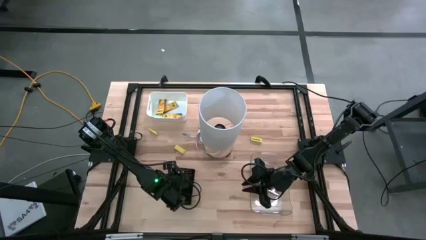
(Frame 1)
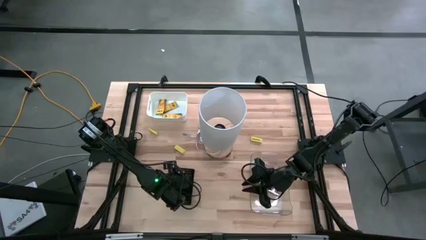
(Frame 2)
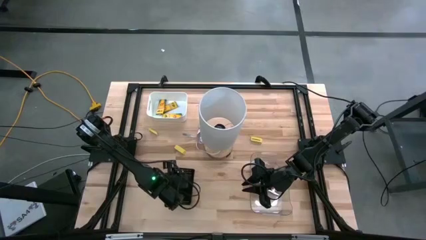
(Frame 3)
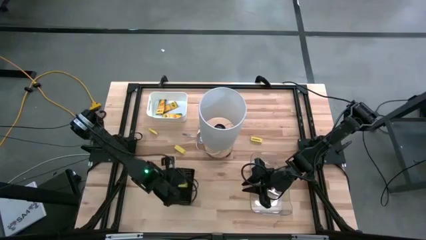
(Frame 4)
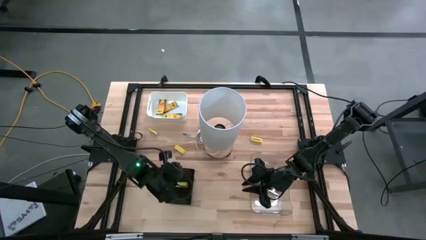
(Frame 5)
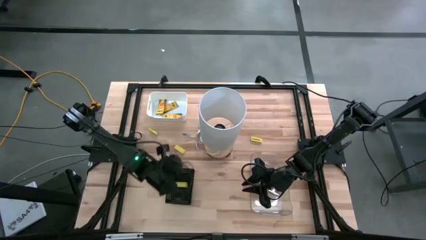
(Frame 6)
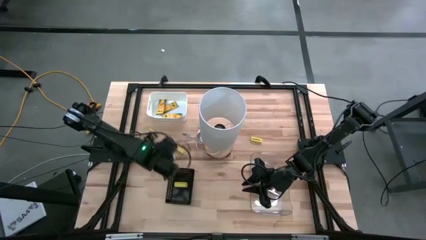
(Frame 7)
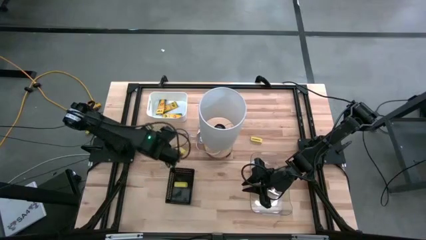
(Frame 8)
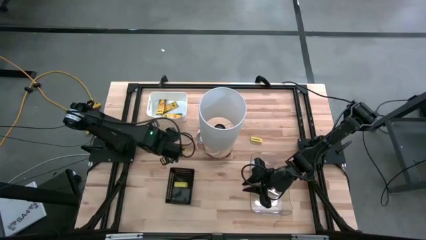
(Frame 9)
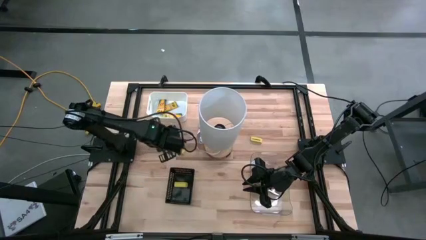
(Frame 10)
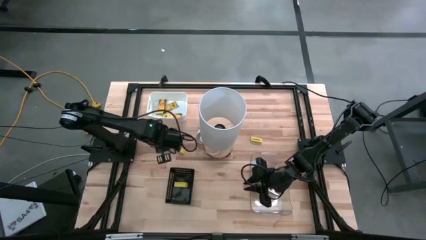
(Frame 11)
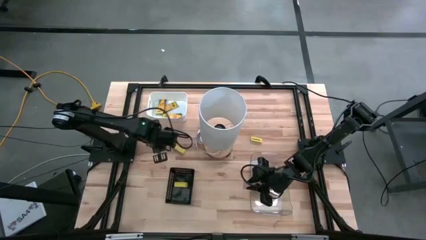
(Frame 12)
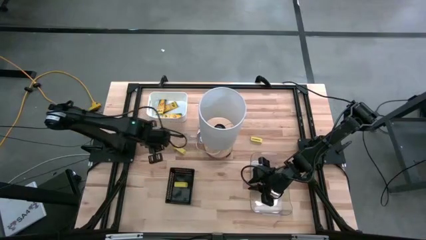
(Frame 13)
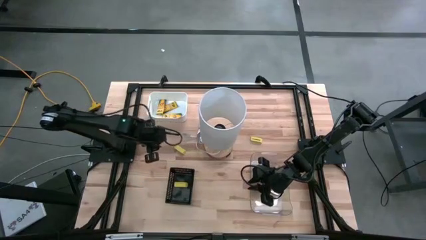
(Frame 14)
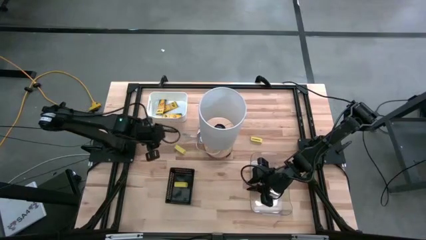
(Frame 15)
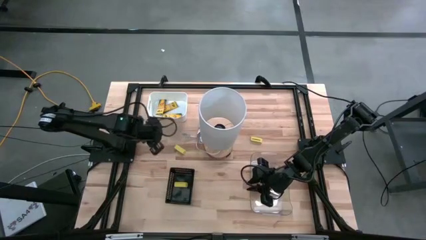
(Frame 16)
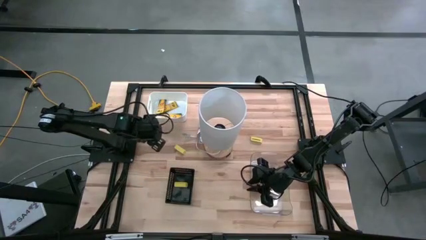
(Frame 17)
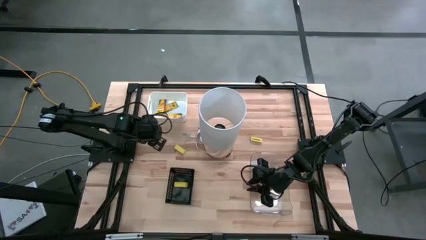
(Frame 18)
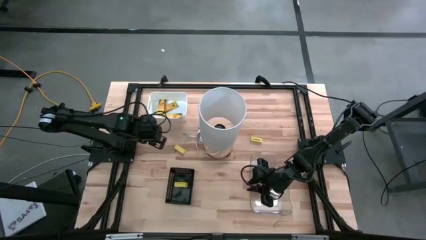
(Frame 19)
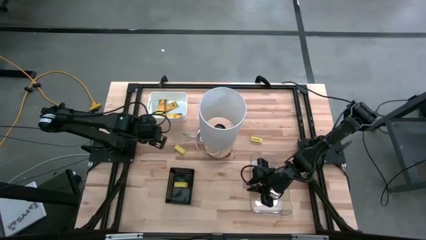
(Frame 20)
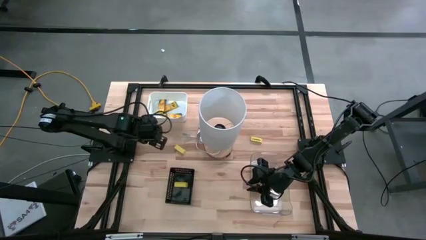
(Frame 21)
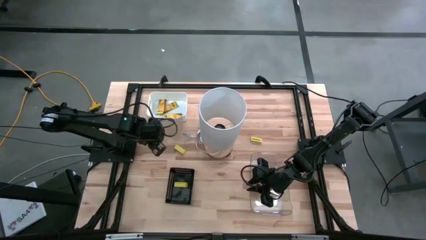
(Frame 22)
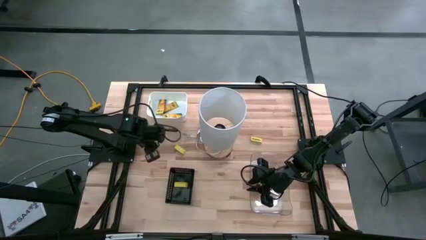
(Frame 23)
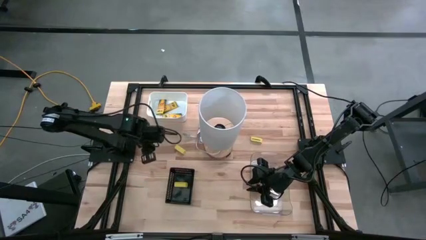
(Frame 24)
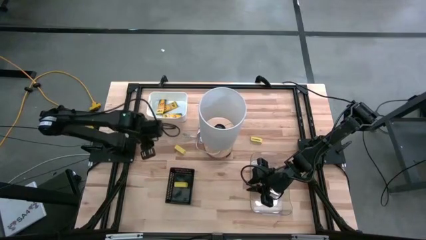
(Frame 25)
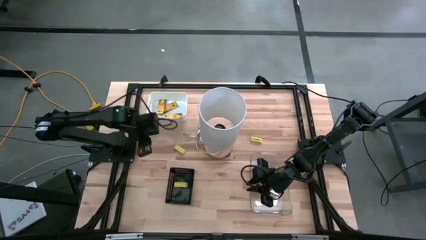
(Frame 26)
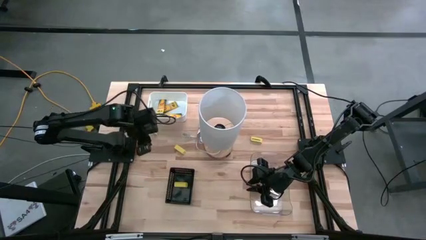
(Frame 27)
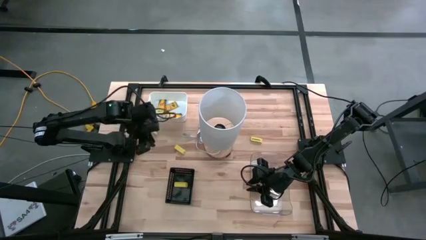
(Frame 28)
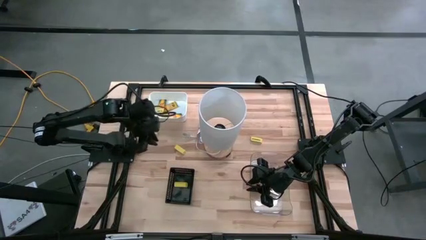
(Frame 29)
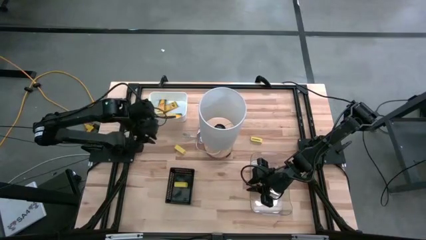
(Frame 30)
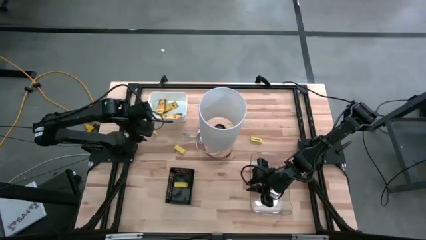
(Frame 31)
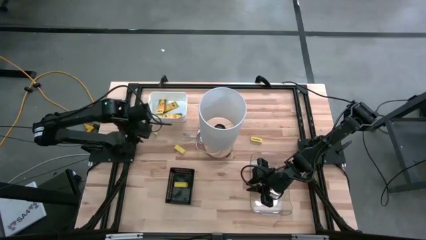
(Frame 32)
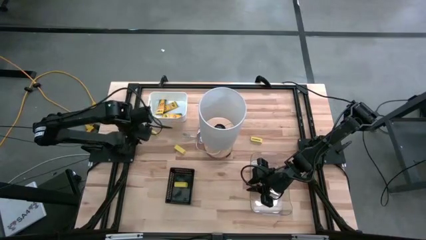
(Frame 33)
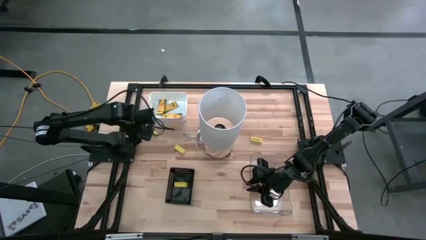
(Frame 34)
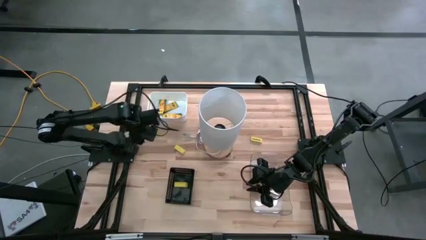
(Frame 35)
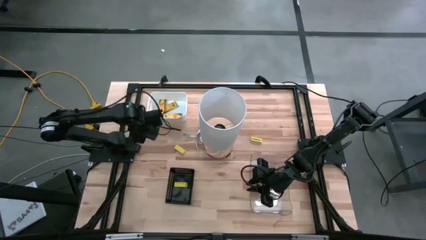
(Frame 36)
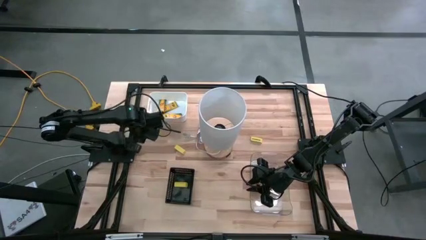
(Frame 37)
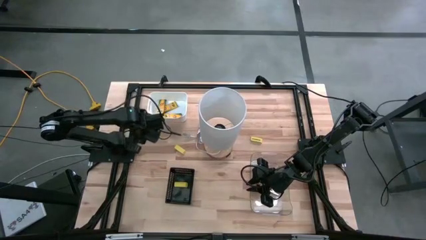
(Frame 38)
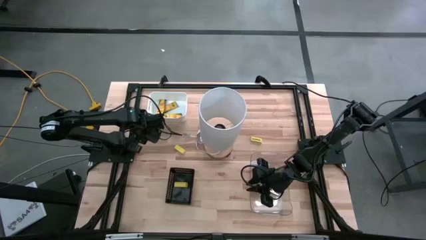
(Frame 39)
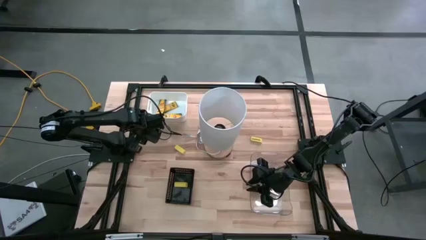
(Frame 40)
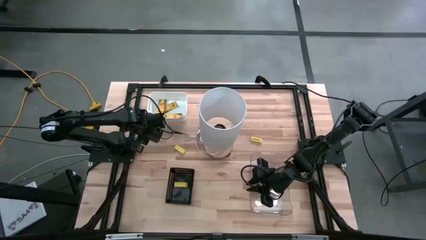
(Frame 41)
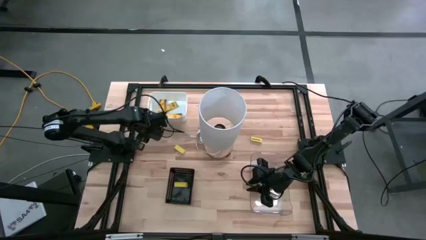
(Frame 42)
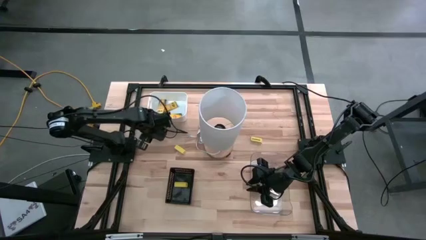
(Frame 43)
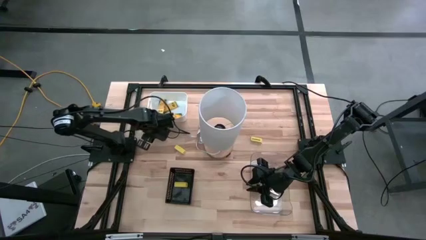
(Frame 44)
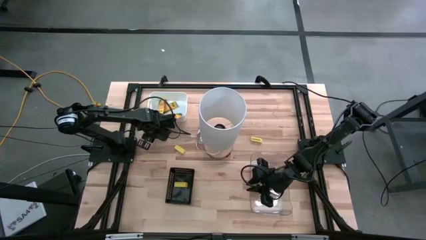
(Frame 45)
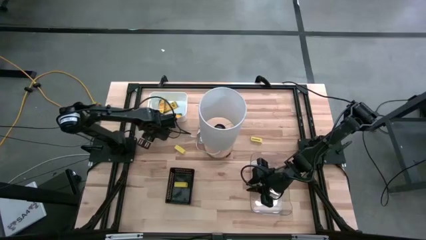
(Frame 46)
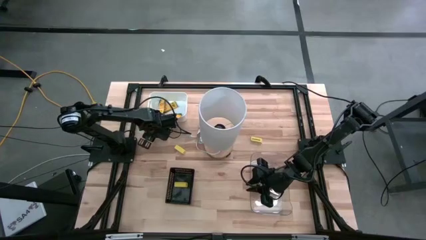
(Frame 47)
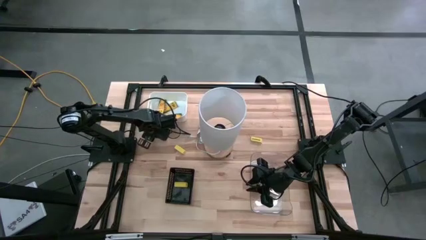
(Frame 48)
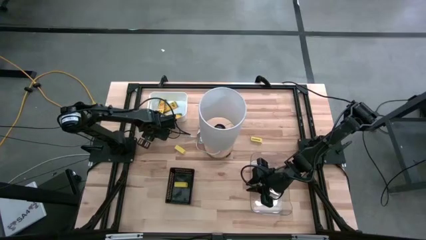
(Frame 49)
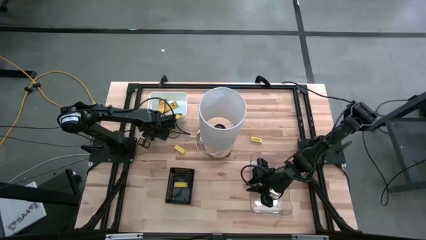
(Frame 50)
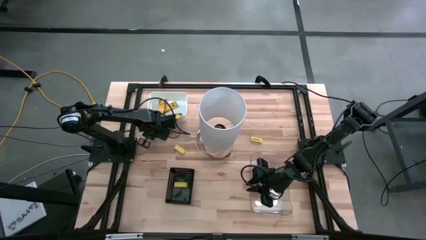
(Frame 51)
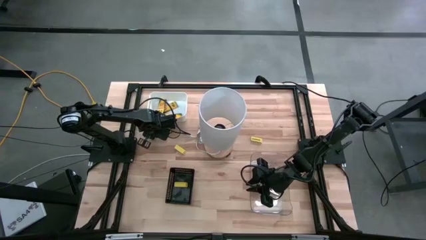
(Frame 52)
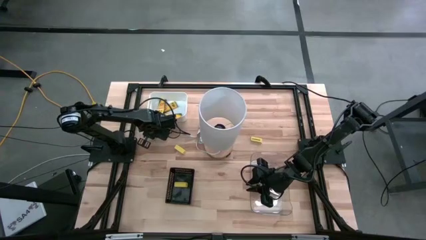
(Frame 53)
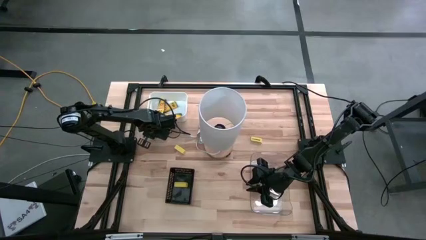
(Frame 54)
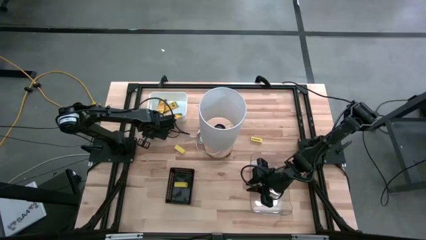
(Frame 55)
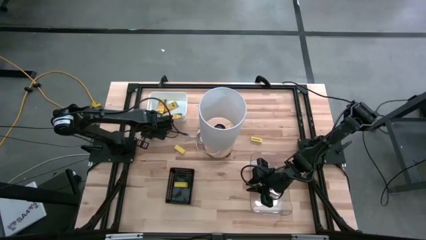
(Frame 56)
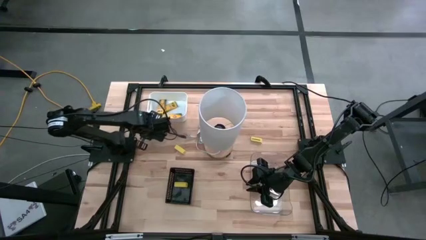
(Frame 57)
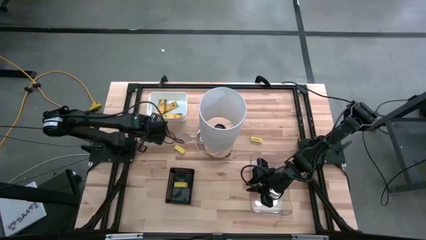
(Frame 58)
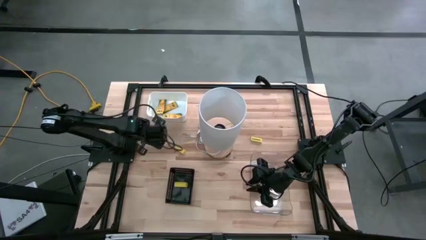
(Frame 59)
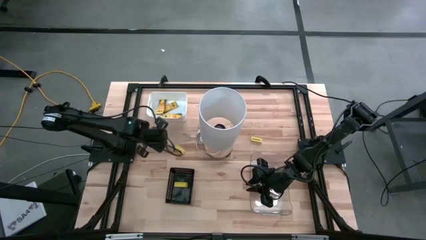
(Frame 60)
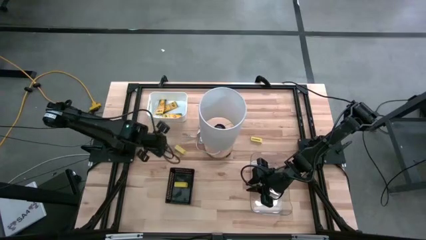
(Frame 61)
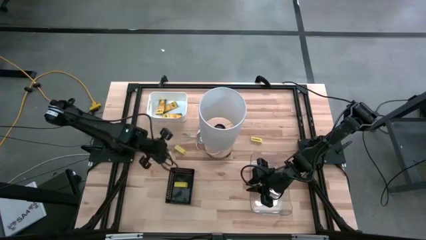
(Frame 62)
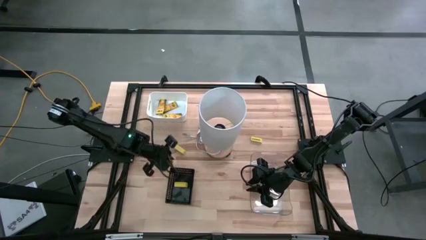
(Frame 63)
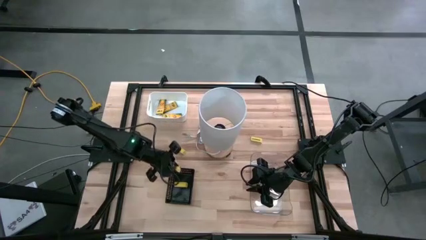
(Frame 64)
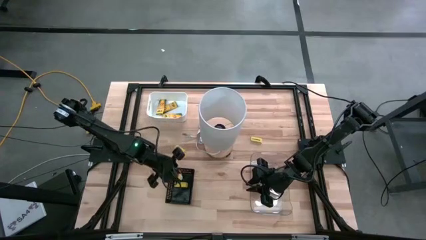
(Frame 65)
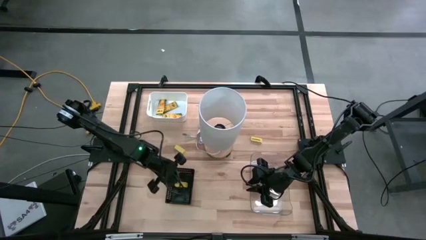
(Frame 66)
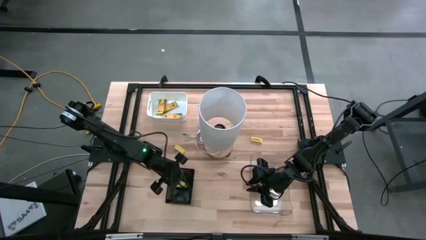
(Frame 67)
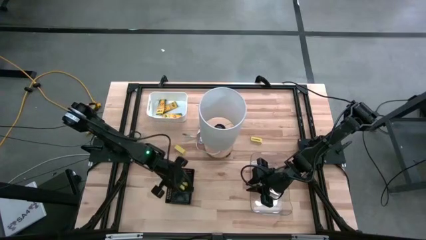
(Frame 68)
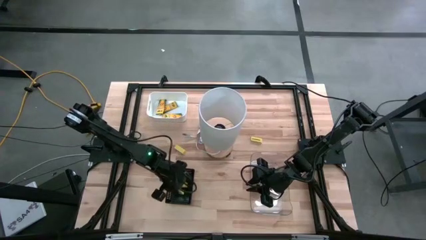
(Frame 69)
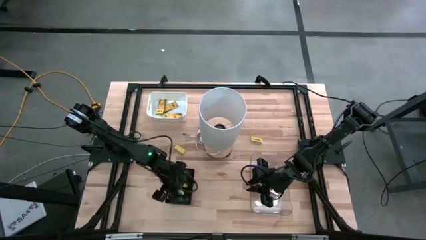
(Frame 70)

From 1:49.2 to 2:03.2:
Task: Pick & Place School Supplies
Put the yellow eraser into the black bin

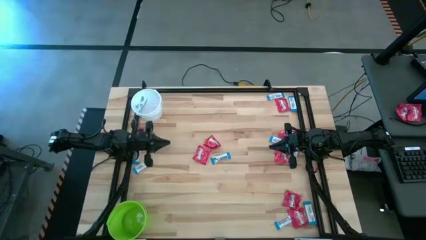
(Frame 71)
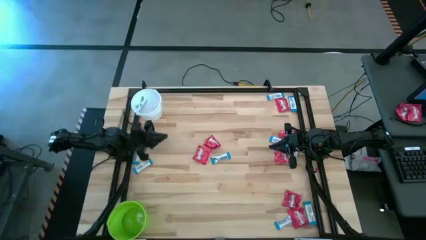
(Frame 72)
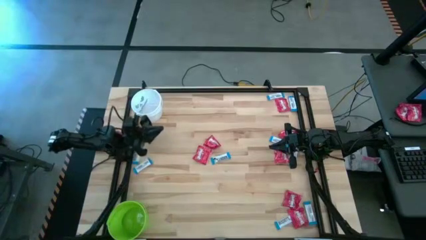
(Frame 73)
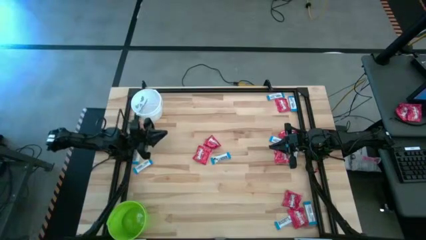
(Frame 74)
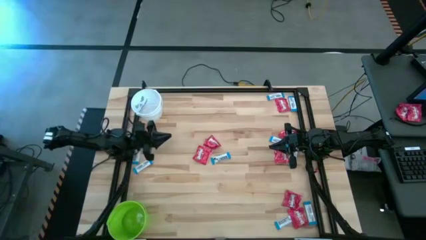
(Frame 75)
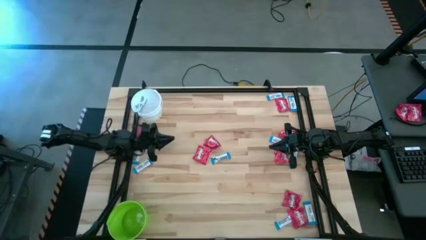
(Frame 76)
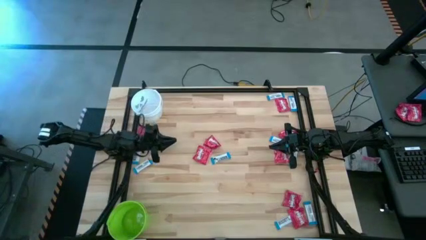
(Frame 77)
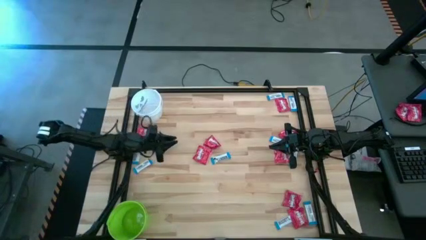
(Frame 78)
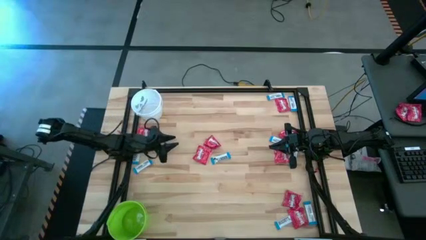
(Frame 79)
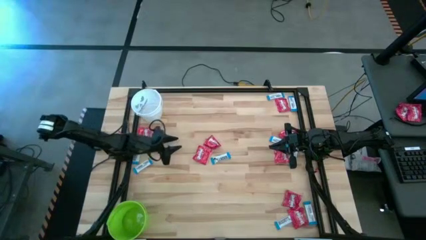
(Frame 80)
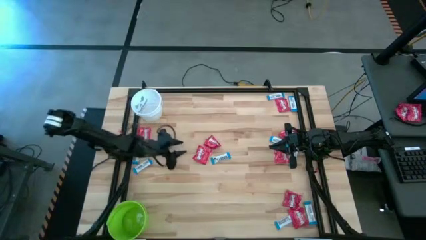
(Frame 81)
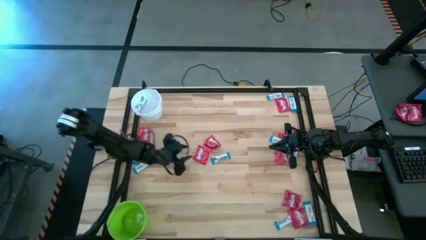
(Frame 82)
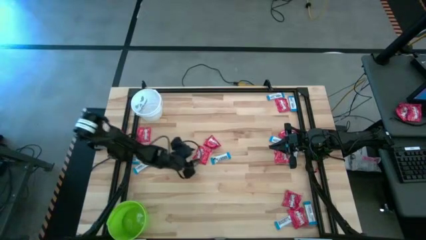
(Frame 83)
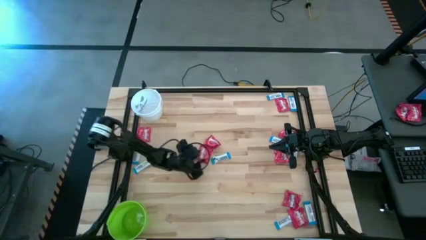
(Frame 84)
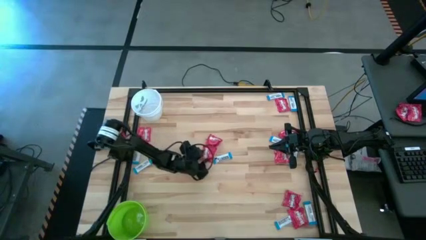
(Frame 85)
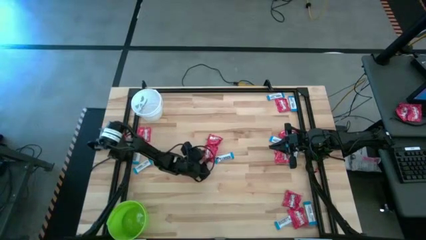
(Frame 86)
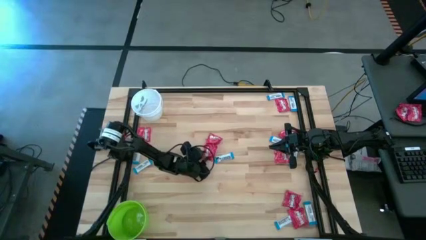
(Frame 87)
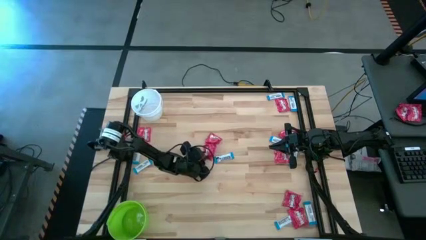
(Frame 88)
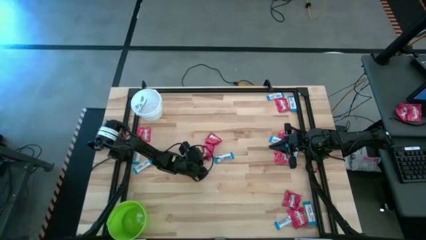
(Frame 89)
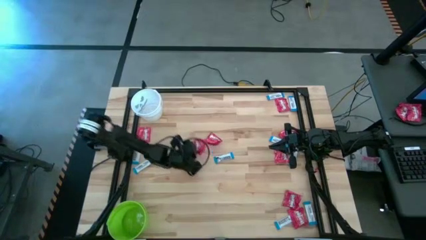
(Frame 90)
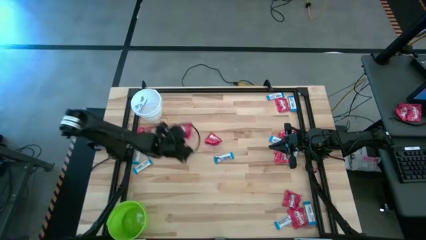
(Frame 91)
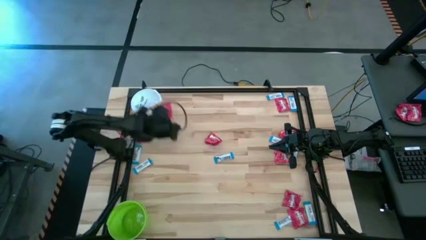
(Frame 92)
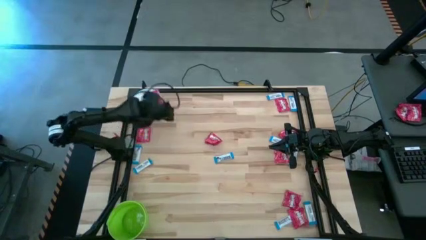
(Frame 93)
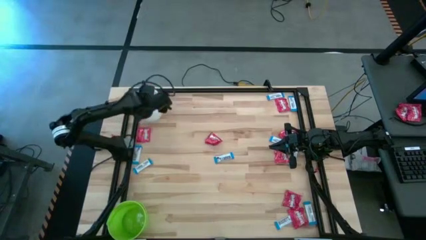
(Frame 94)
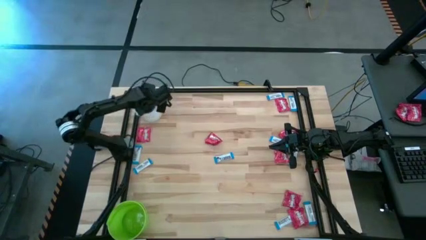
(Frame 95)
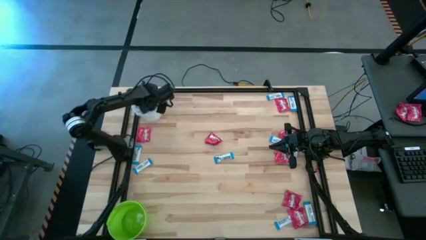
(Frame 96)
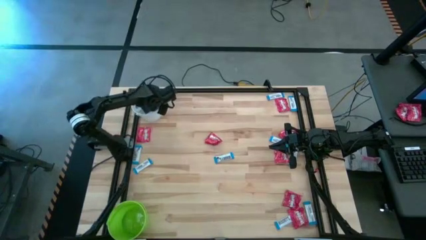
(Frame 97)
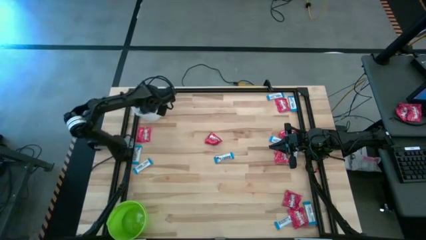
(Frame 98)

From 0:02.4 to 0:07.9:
Task: Sort candy by brand, put in halloween buckets
Put the red candy into the white bucket
